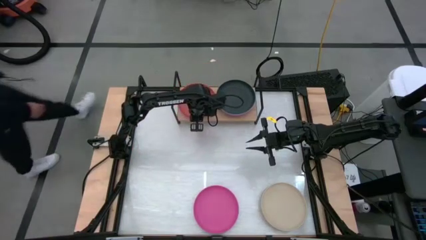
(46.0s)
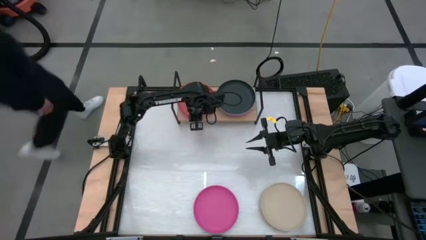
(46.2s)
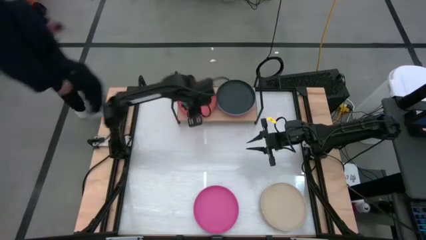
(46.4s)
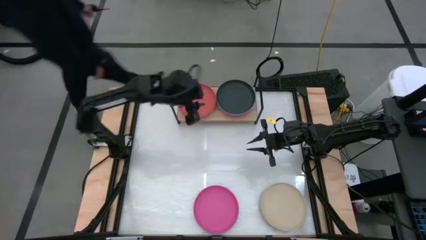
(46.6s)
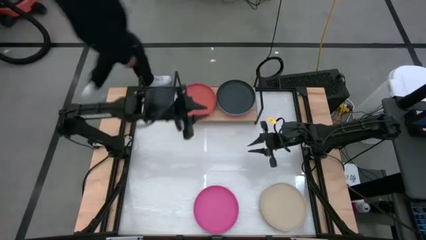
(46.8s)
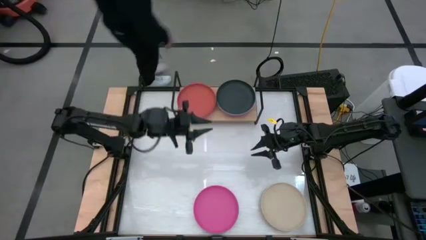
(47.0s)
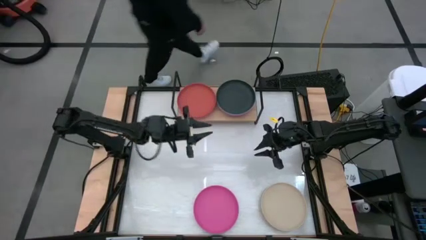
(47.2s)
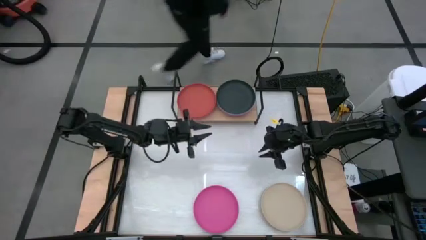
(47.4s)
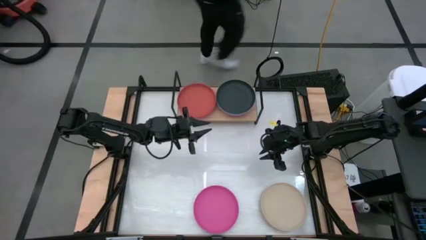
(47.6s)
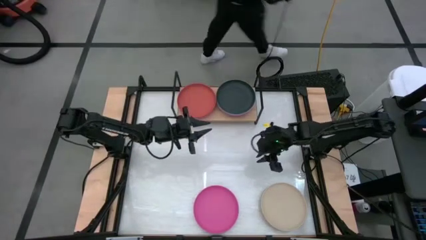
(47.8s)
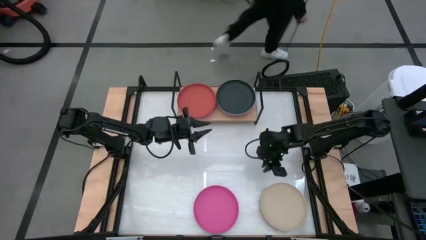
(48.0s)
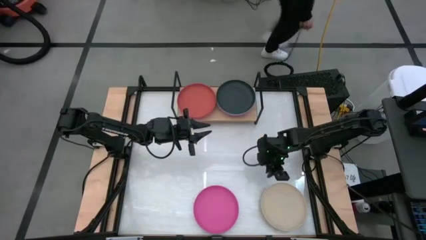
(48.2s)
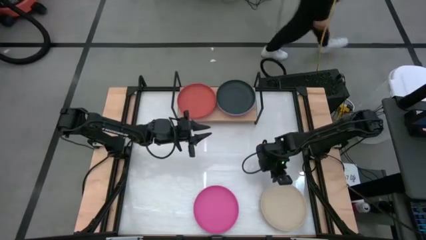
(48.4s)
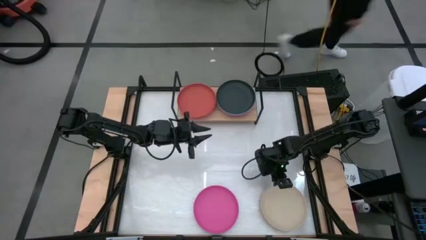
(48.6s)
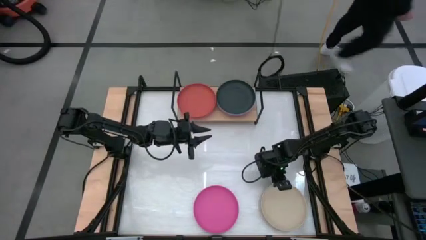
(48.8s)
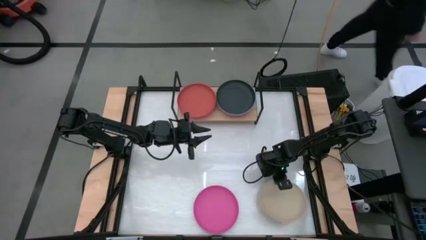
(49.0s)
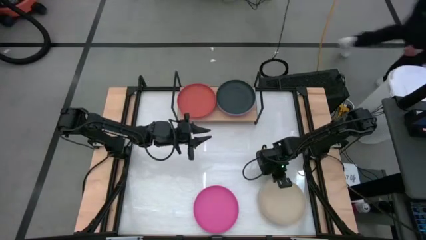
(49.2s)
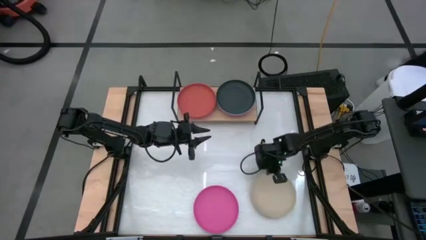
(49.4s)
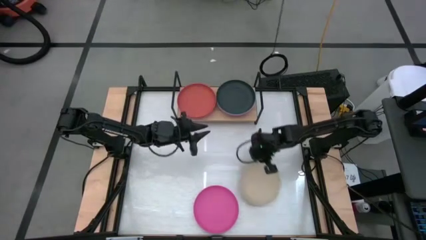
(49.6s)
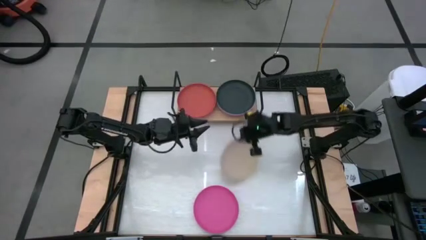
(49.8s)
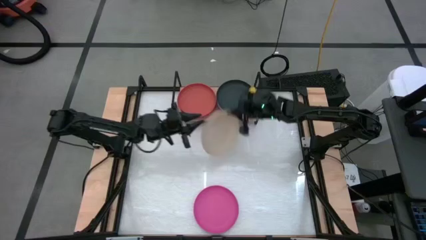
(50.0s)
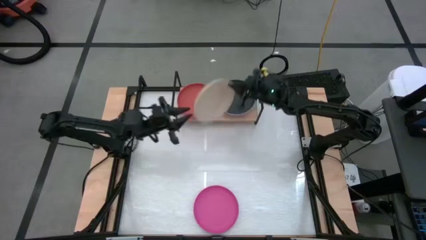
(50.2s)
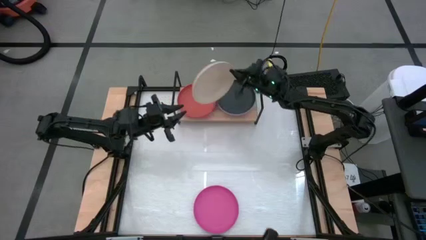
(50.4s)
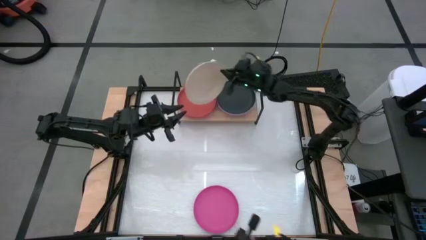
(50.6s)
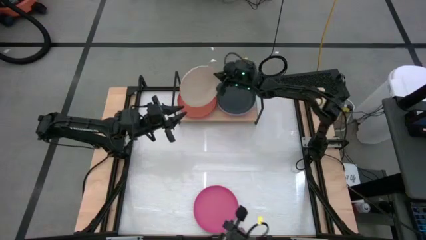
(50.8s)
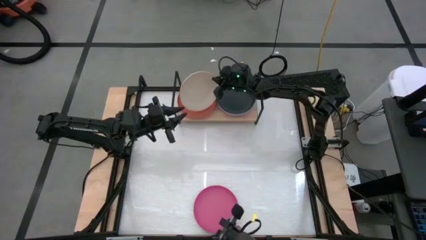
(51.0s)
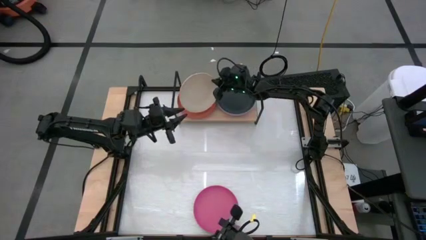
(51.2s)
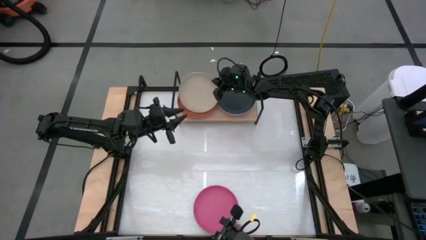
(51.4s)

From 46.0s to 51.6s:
Task: Place and stack plates onto a shelf
Stack the white plate on top of the orange plate on the shelf

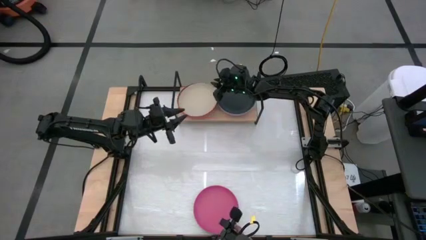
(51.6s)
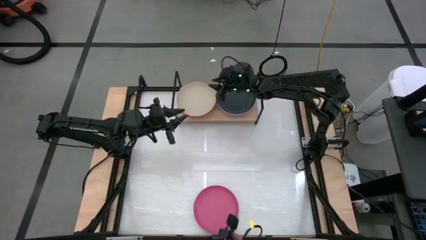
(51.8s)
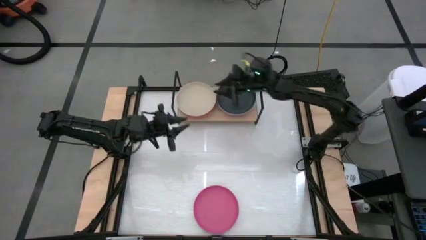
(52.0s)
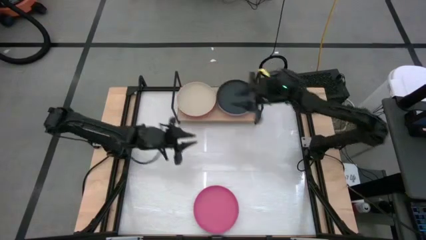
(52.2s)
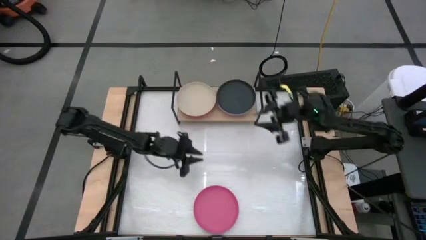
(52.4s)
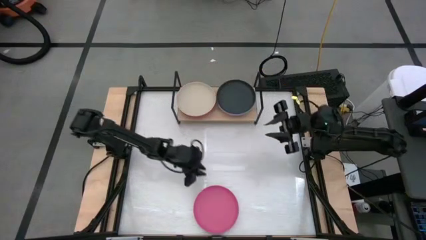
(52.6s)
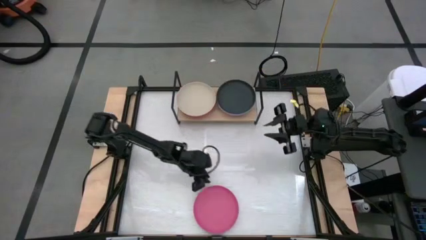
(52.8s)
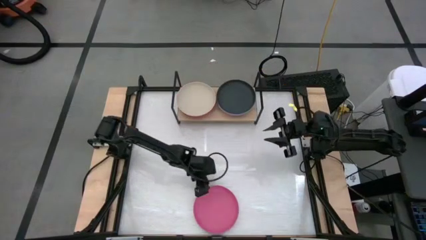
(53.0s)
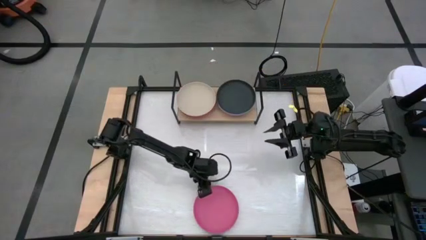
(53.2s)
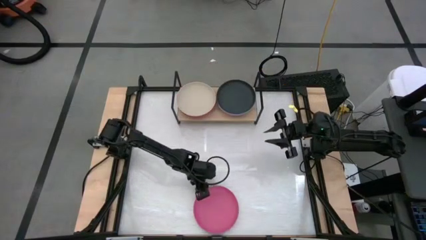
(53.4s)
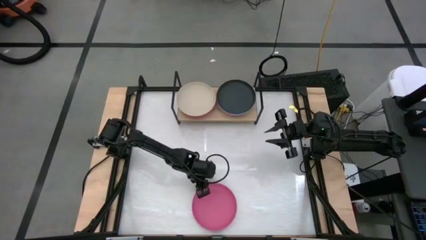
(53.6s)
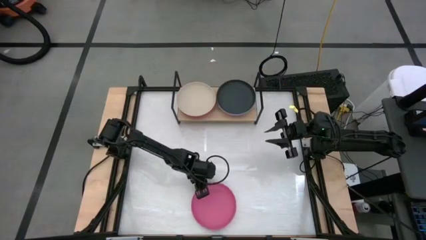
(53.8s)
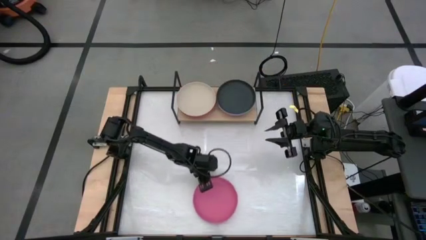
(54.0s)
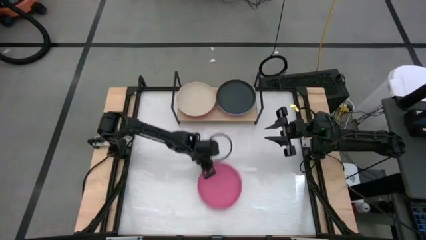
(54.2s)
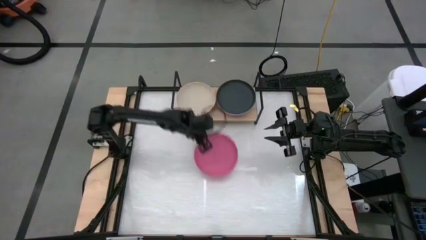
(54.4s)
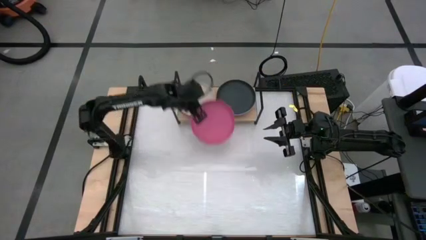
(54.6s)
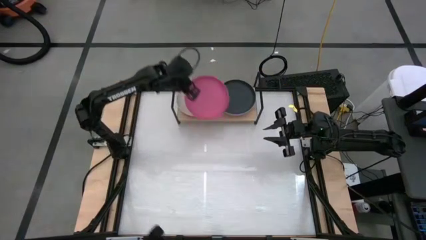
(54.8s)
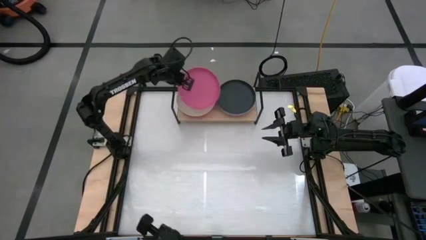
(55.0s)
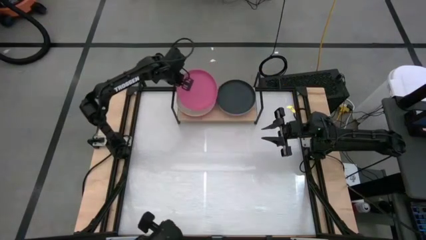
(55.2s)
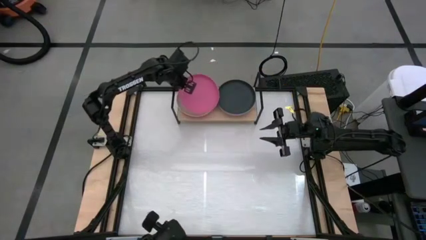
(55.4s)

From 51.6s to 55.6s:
Stack the pink plate on top of the white plate on the shelf

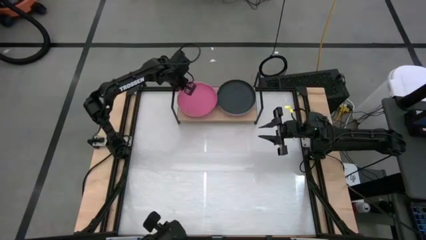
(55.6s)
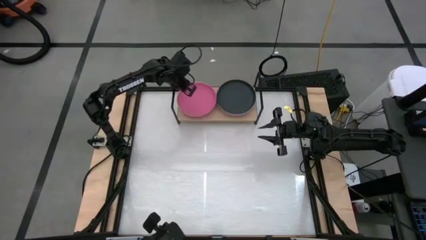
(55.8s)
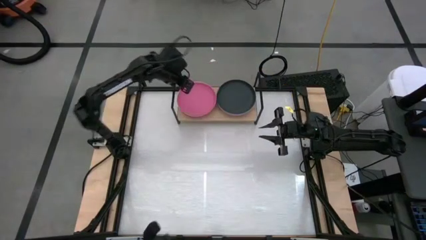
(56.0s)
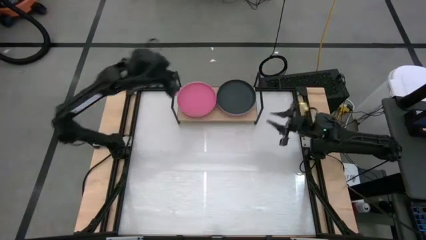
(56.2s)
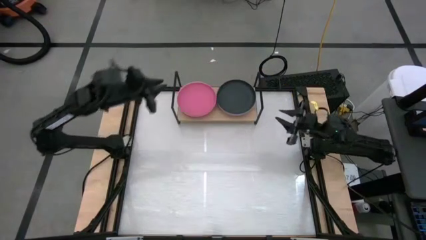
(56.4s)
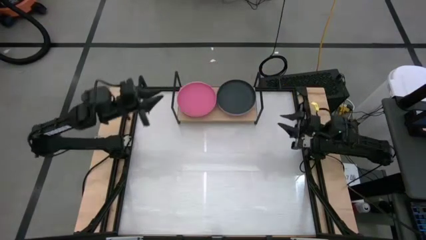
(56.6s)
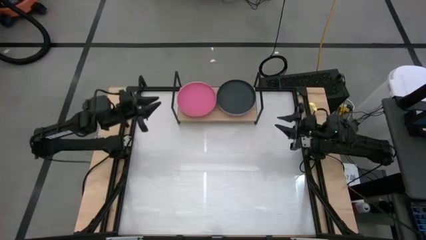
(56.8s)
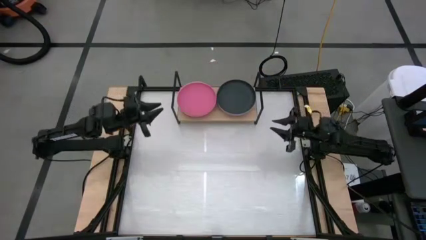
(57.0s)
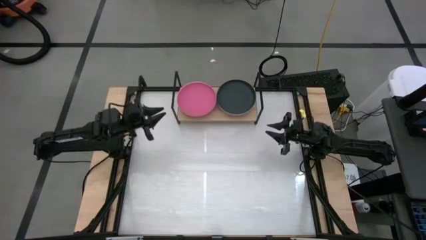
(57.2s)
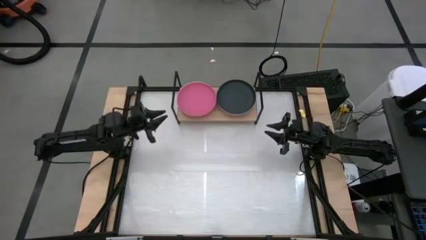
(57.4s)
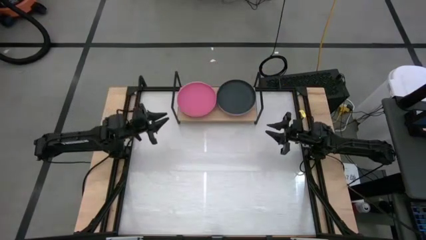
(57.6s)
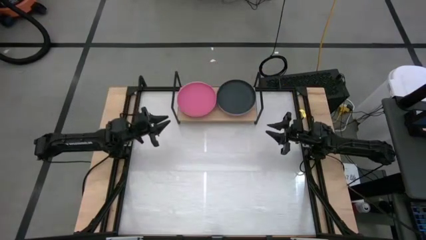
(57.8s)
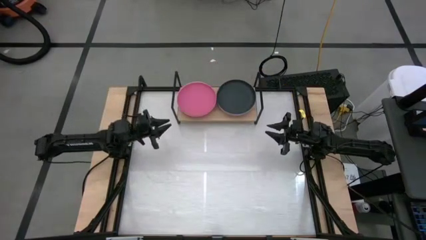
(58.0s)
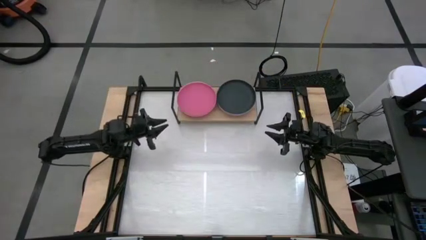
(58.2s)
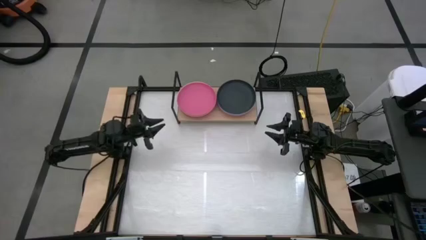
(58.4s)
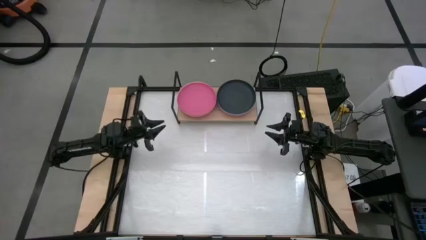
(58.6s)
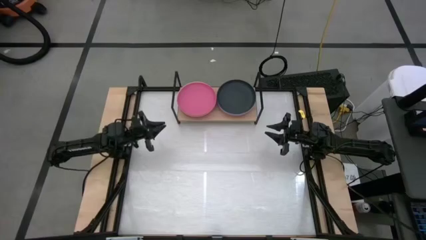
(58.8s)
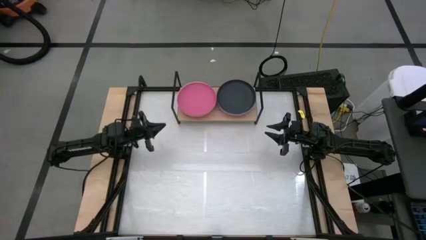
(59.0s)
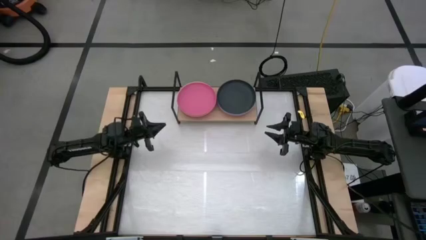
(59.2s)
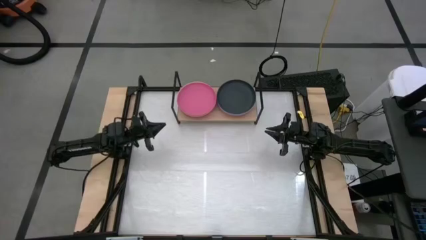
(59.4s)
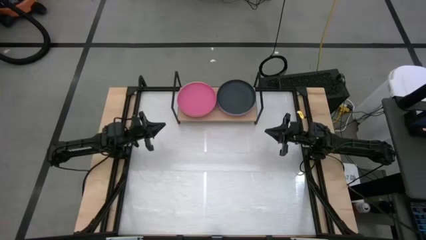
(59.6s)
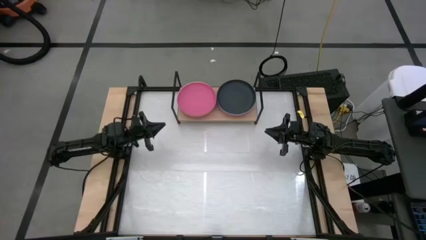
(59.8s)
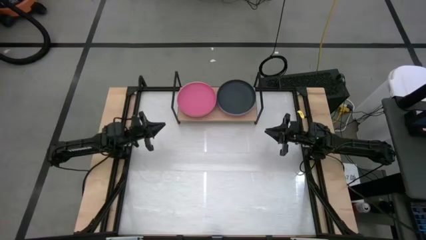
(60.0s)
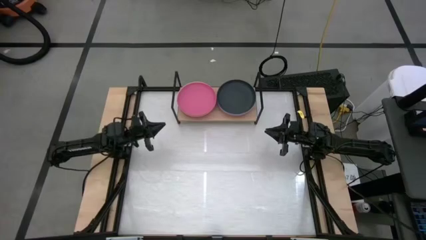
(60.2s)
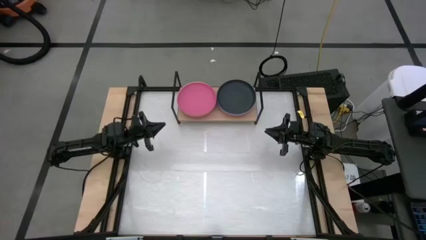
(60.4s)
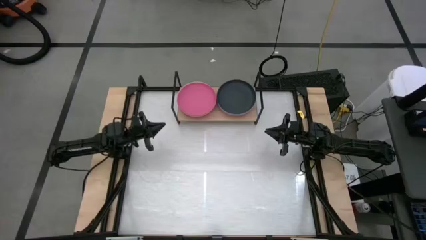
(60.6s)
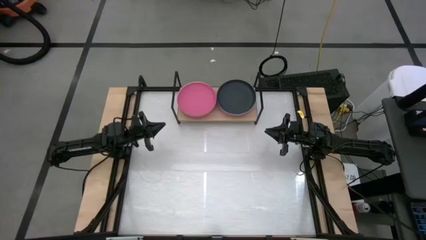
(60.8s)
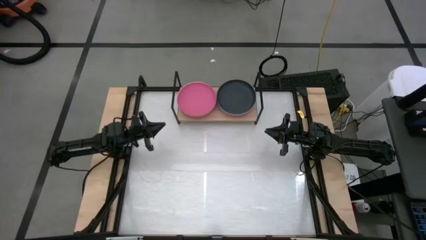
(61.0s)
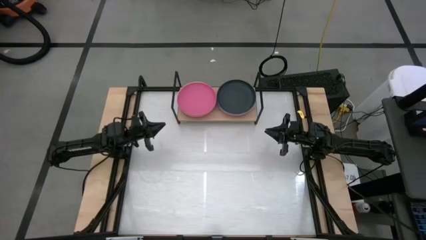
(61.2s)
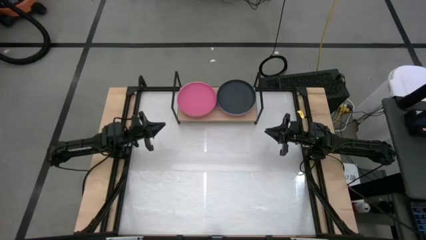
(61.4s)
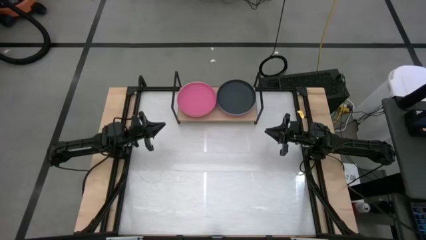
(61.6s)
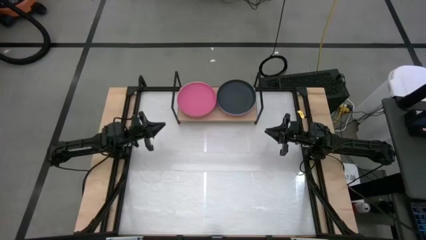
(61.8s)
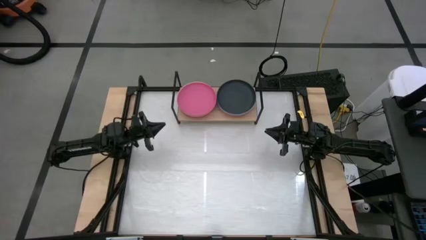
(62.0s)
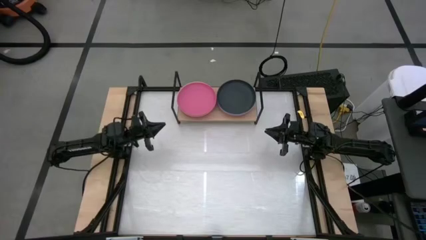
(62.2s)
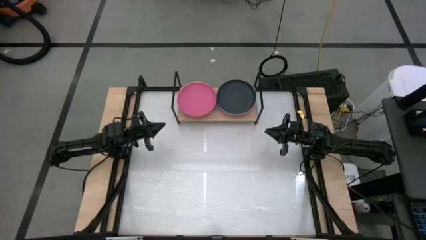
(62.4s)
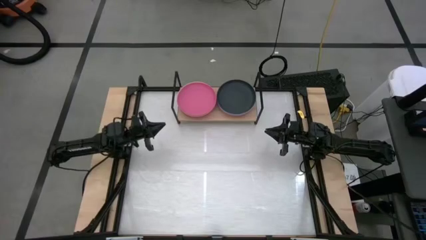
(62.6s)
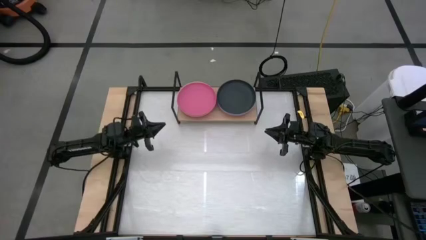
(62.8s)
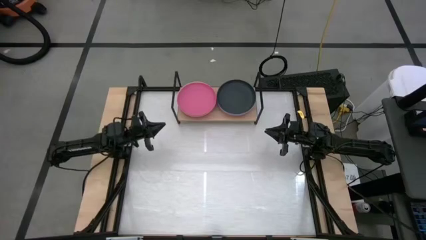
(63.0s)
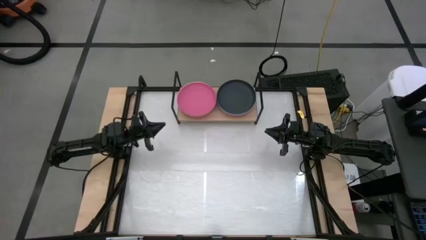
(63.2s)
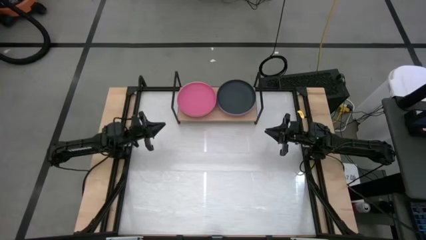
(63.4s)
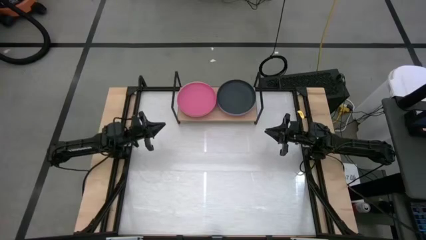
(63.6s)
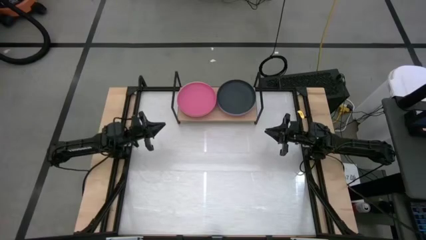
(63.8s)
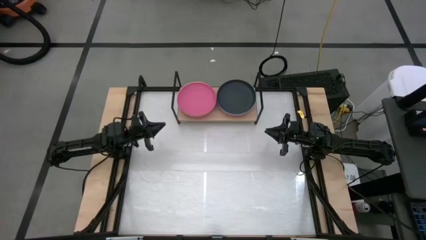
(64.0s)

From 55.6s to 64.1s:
Return to Home Position
